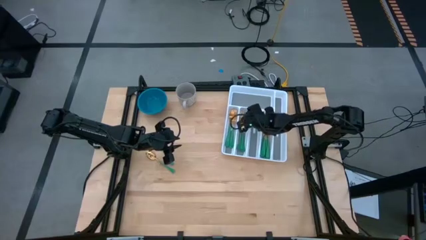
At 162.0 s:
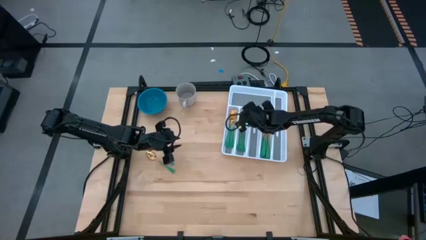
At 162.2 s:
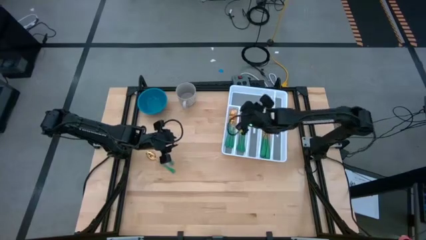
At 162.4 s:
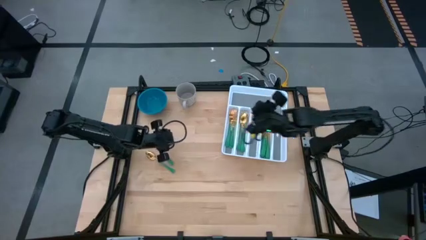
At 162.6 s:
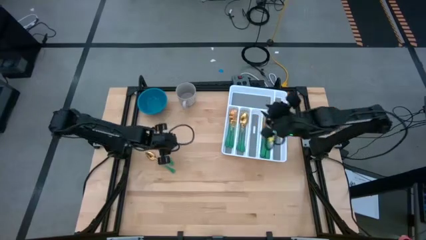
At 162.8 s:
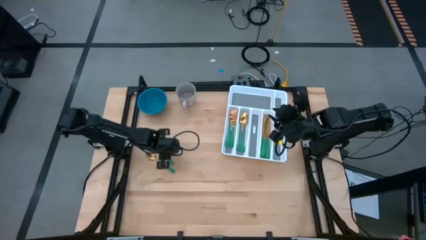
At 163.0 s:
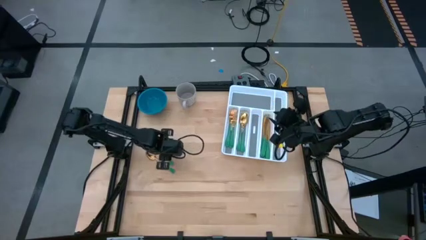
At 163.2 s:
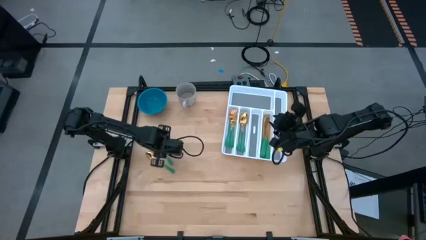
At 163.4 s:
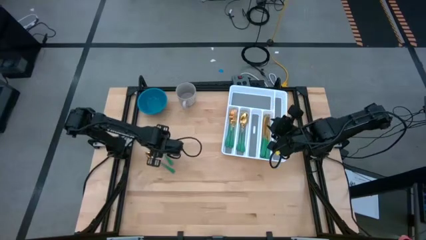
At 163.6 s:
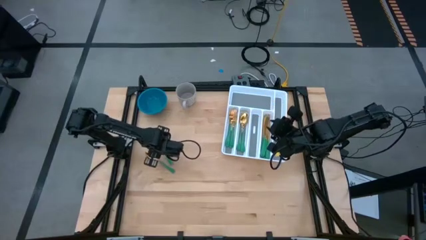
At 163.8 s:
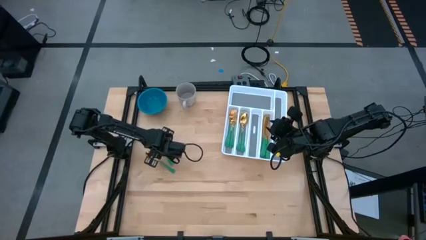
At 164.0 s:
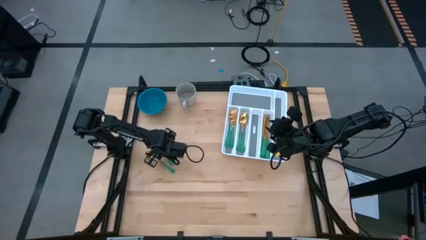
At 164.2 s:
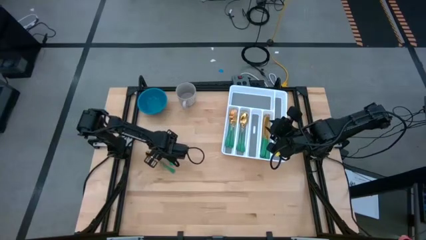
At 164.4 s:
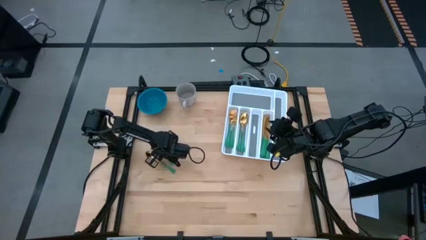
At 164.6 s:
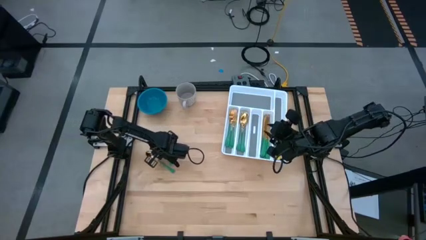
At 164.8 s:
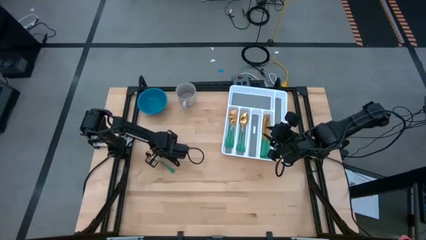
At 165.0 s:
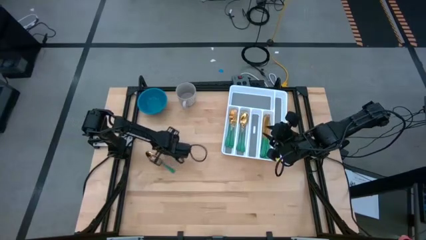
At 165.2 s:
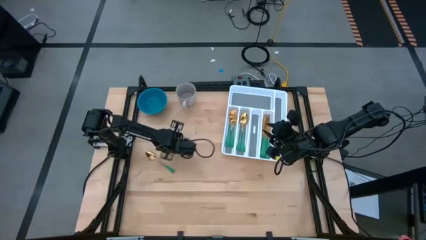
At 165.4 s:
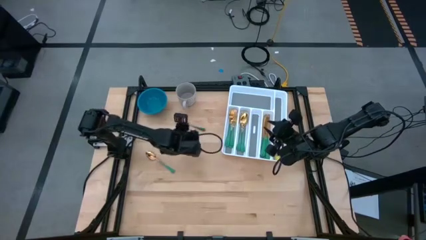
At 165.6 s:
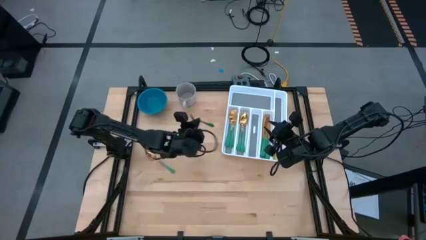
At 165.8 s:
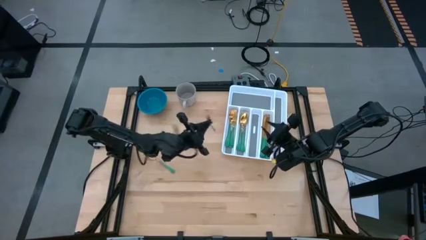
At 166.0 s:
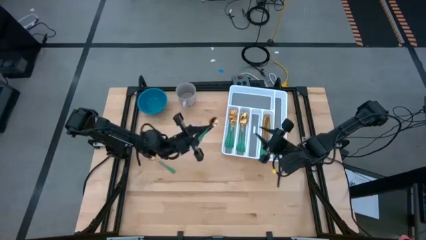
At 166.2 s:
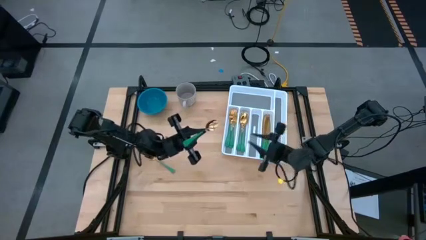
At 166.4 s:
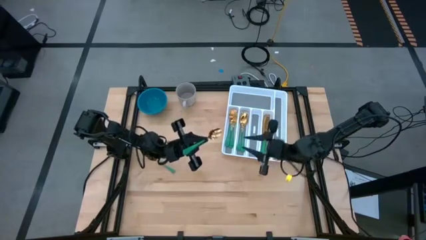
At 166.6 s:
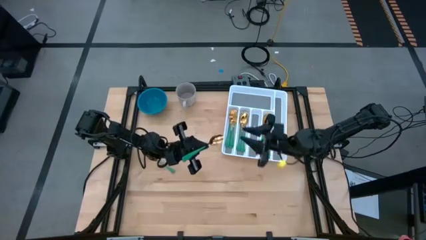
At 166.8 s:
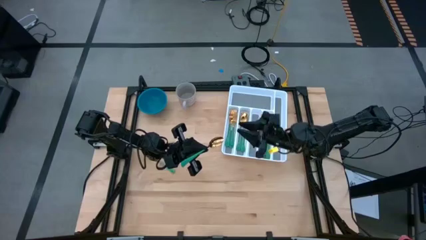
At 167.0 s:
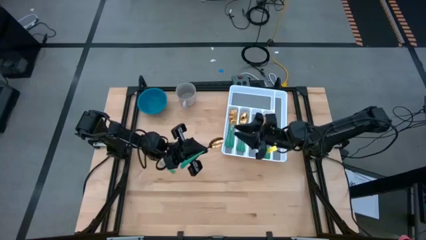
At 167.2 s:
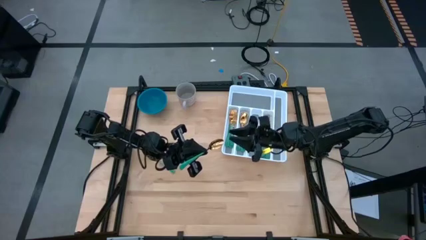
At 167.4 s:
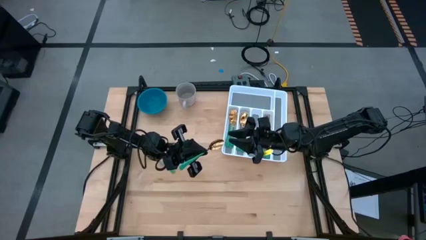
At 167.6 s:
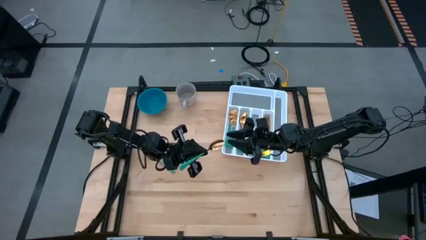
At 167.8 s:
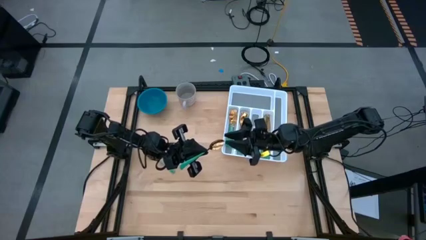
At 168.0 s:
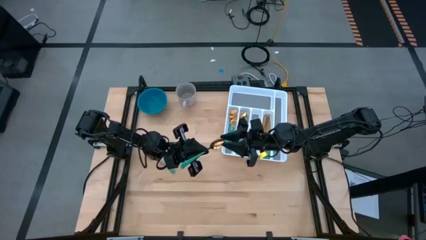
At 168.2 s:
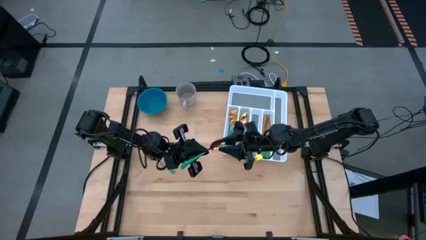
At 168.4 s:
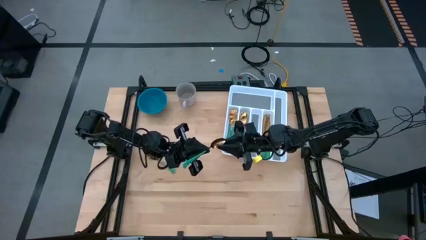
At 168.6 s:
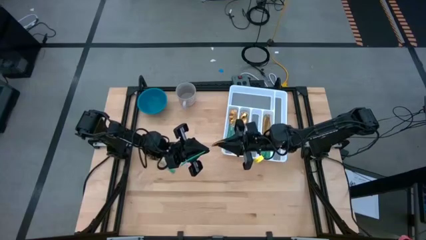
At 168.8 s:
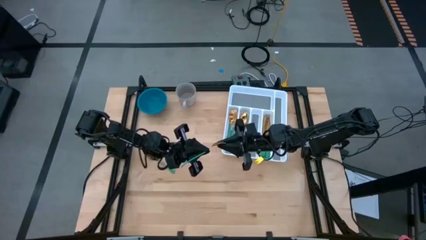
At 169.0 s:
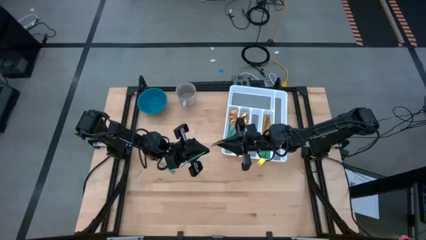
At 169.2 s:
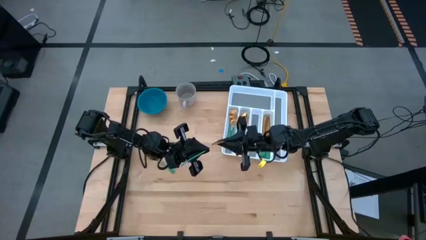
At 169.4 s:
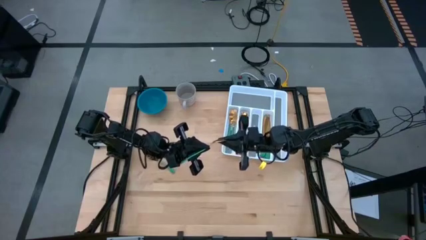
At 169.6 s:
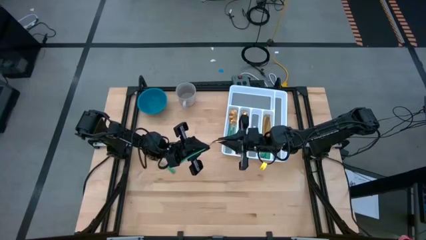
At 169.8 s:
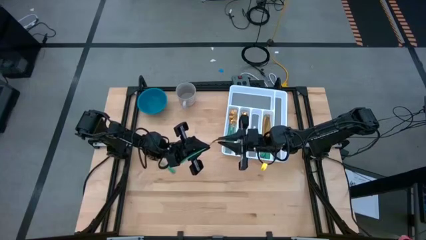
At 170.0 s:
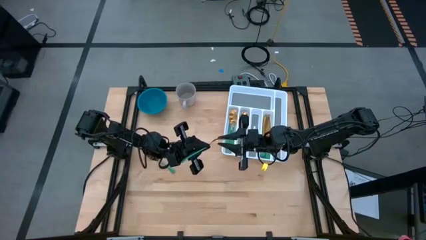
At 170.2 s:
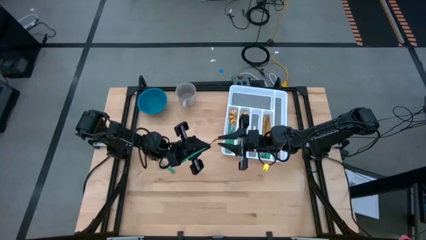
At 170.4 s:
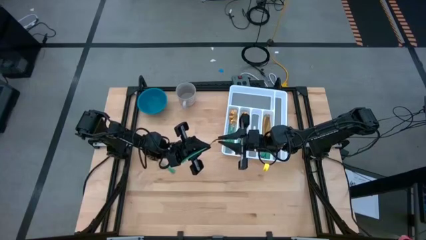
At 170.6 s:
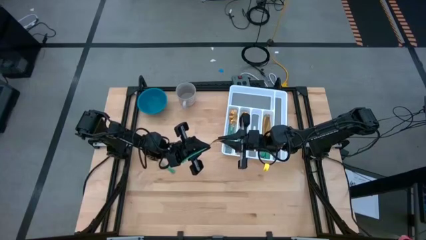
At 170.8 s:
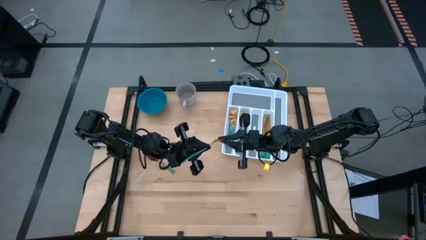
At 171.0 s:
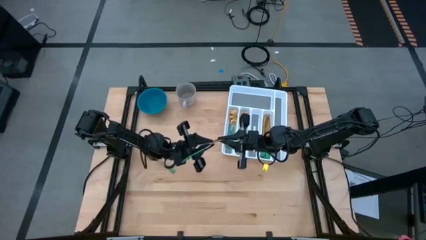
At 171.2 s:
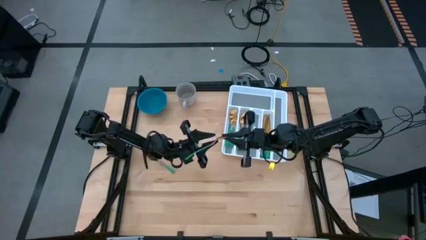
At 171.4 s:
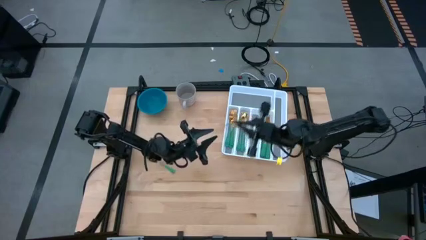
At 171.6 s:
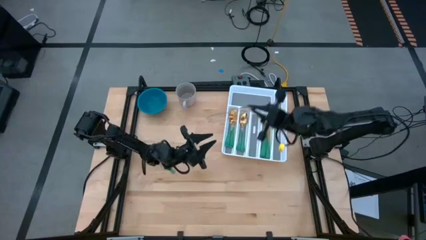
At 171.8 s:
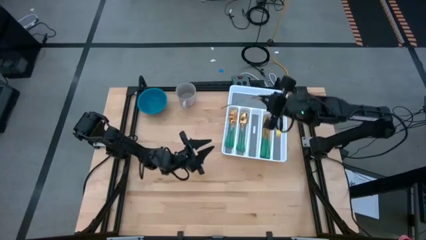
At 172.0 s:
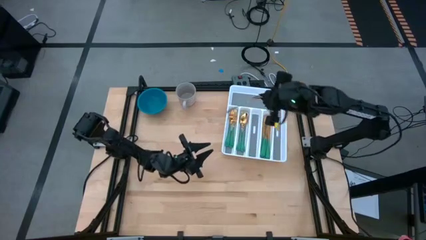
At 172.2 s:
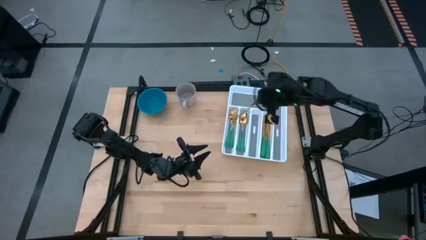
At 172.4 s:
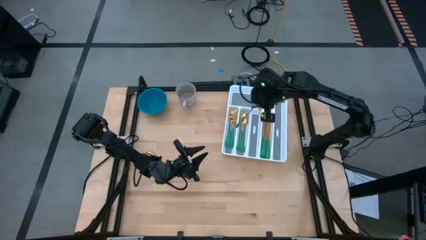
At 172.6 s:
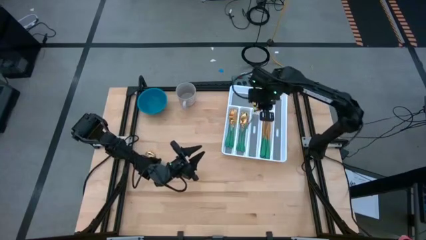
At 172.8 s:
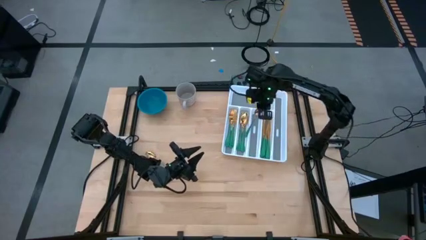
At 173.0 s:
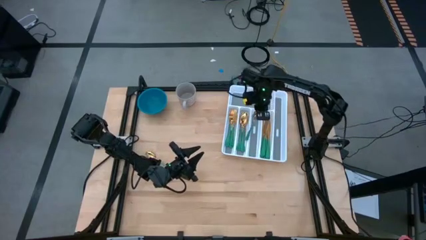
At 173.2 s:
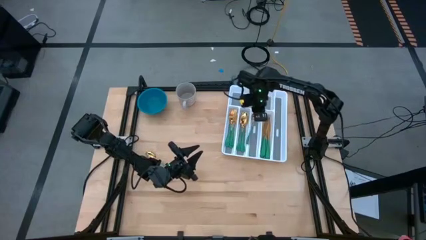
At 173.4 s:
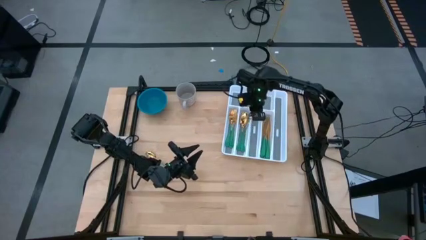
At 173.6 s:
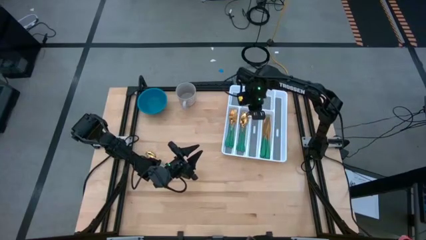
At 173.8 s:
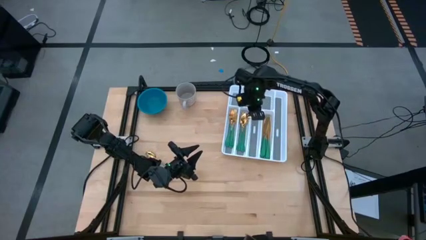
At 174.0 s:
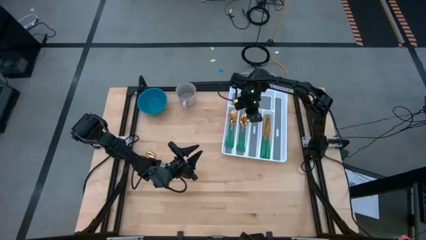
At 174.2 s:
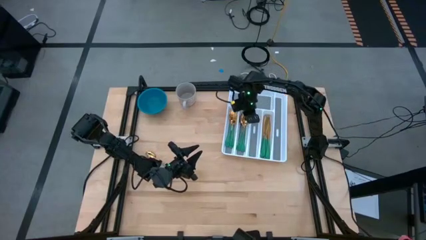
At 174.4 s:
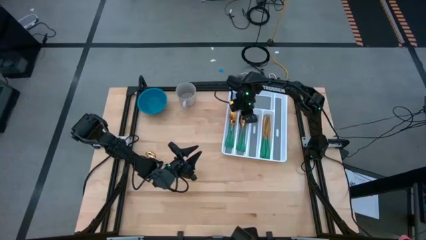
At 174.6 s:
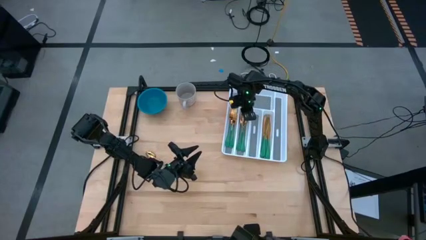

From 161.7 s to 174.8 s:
Task: Sort silverware
Put the green spoon into the white silverware organizer

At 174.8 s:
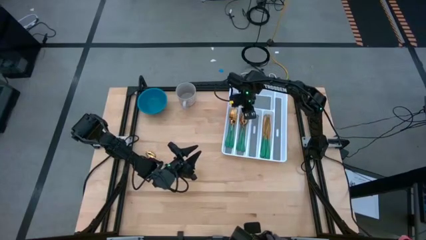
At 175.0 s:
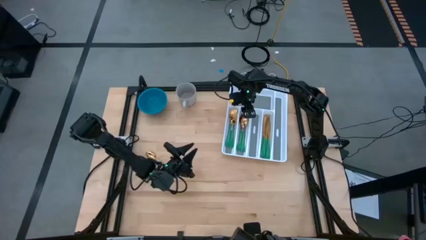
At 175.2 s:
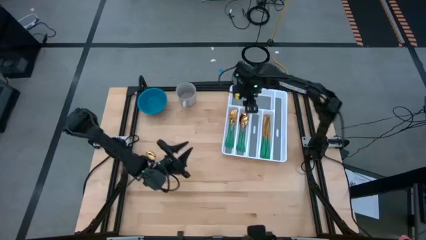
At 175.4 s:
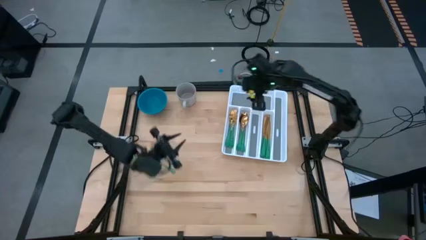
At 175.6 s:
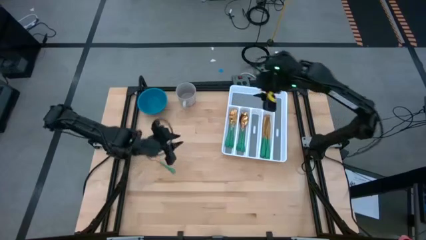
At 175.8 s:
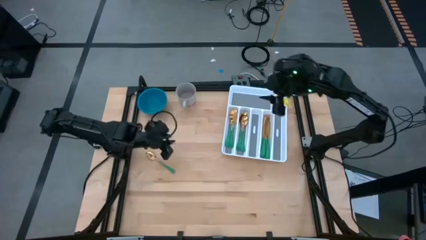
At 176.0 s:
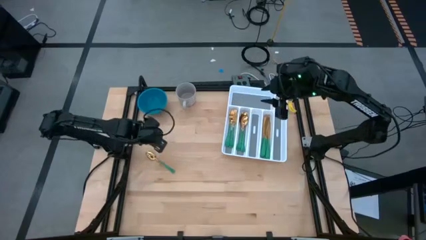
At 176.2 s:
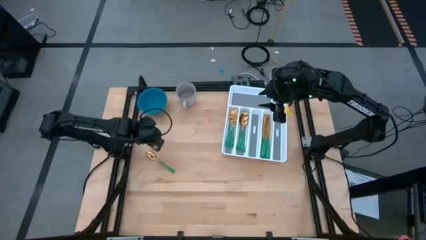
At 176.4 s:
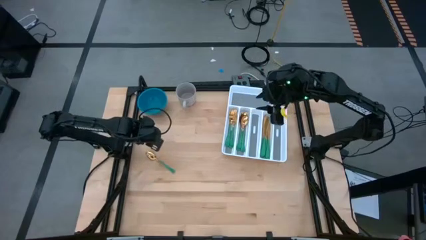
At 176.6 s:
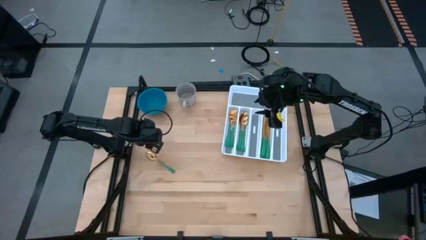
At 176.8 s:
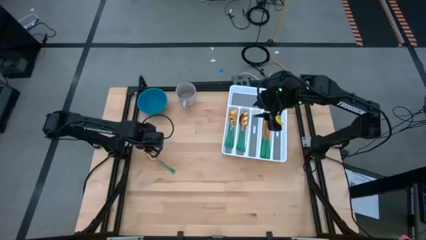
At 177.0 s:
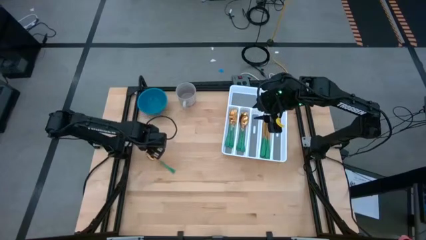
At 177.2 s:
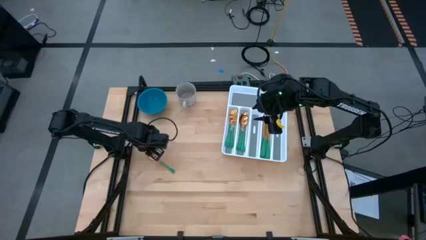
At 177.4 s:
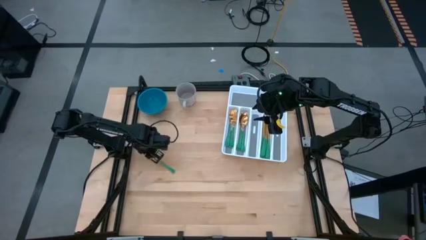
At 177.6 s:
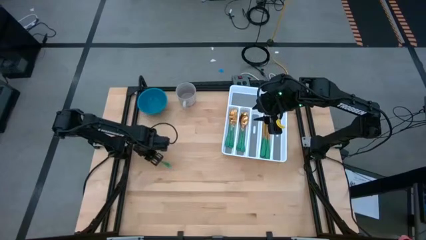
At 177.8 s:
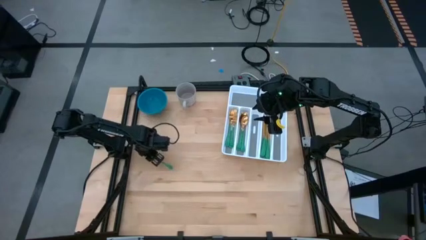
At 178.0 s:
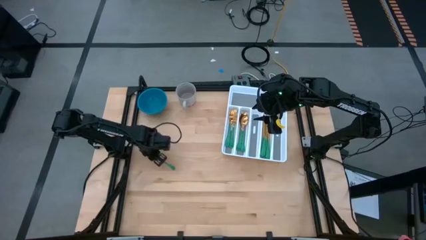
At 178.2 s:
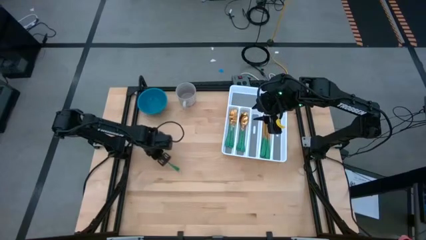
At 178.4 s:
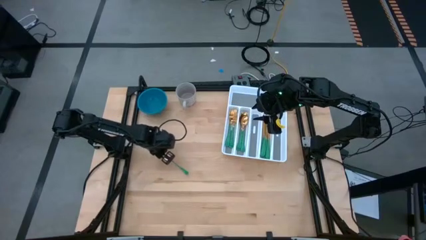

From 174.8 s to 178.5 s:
Put the green spoon into the white silverware organizer
